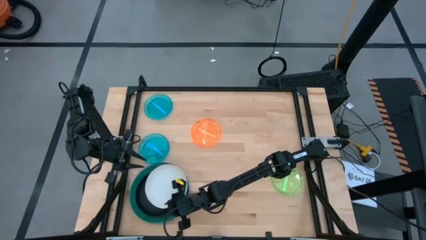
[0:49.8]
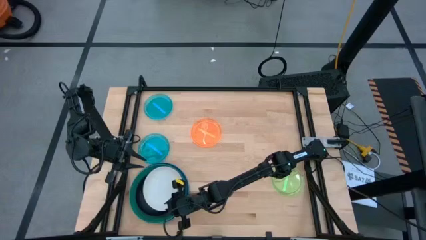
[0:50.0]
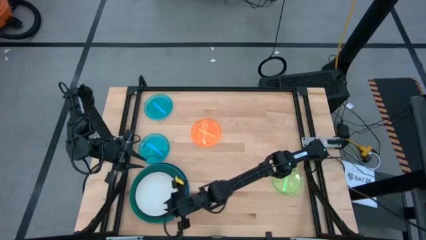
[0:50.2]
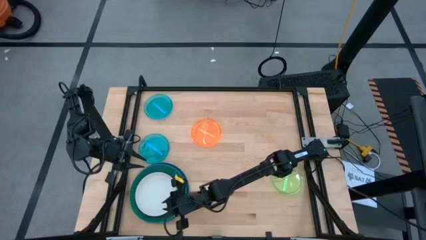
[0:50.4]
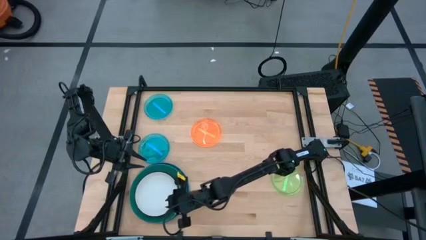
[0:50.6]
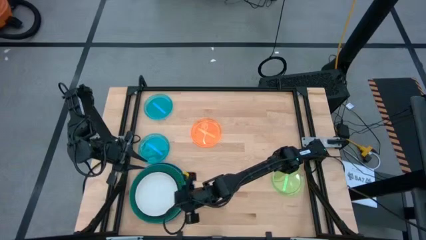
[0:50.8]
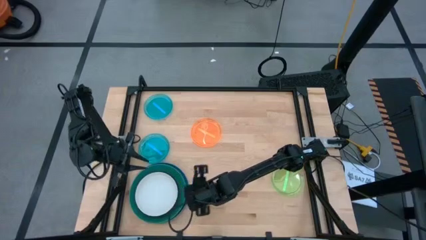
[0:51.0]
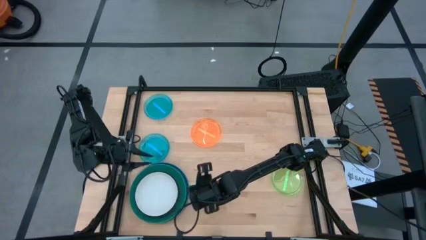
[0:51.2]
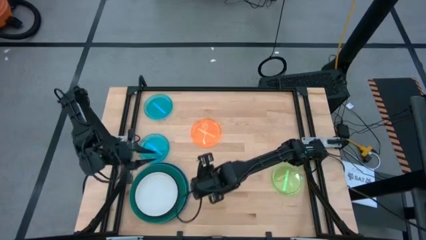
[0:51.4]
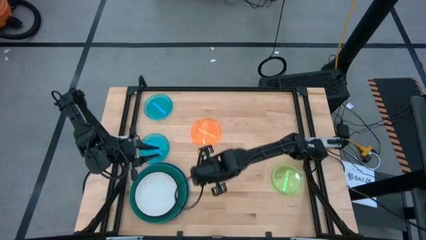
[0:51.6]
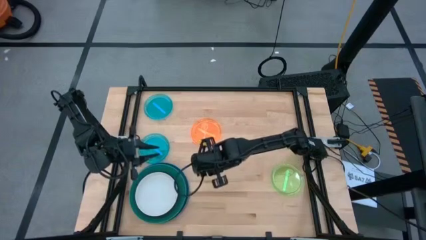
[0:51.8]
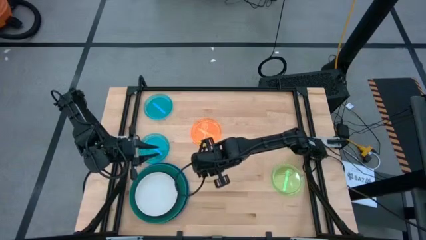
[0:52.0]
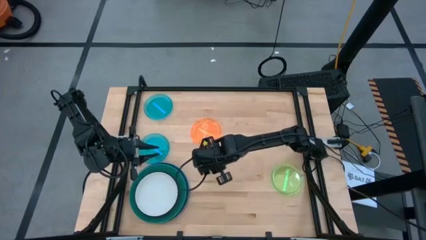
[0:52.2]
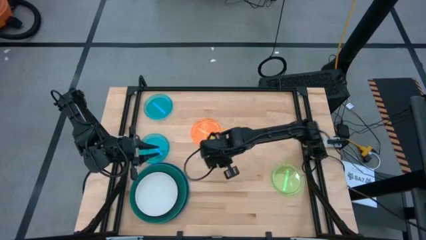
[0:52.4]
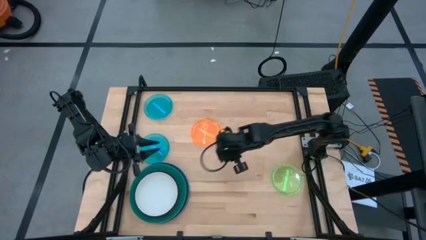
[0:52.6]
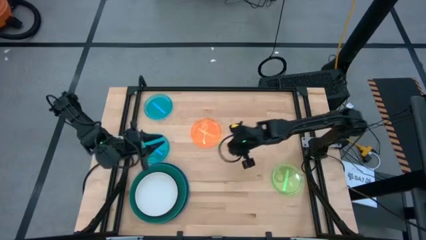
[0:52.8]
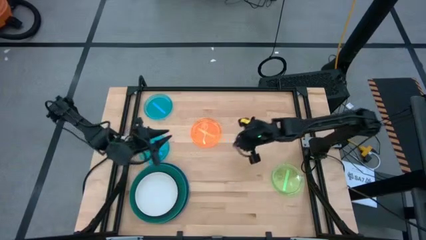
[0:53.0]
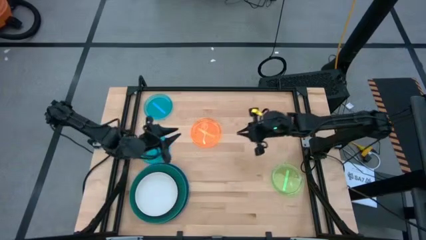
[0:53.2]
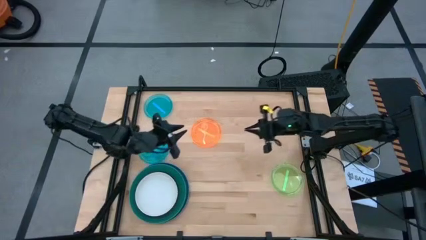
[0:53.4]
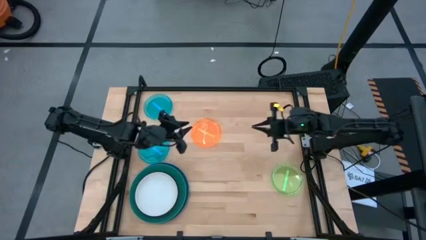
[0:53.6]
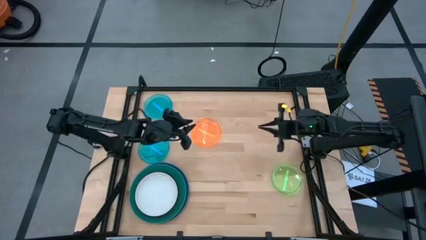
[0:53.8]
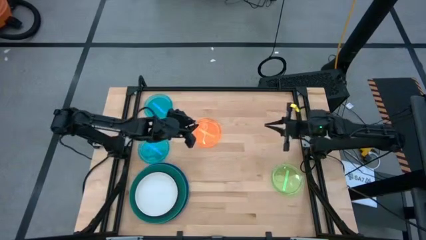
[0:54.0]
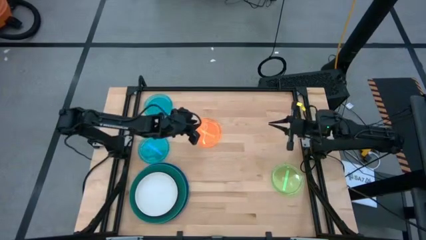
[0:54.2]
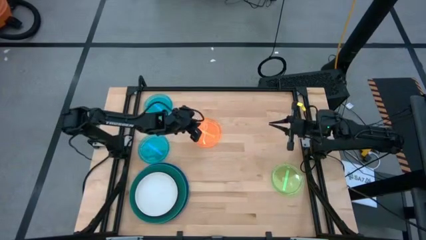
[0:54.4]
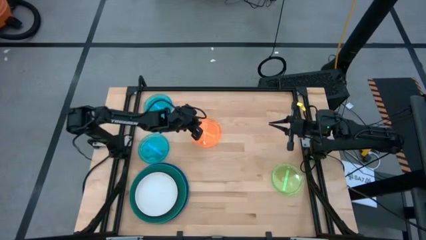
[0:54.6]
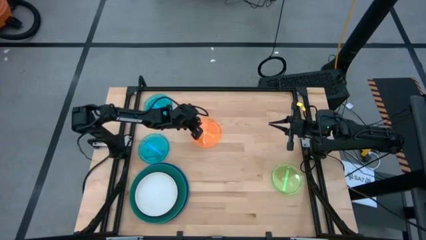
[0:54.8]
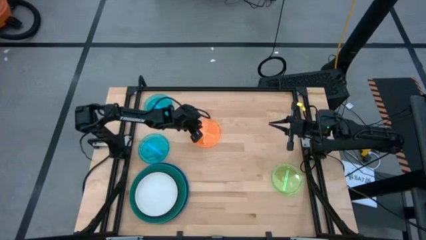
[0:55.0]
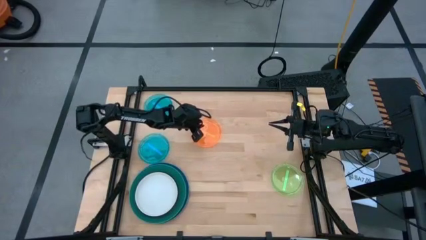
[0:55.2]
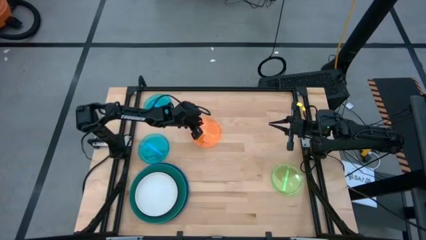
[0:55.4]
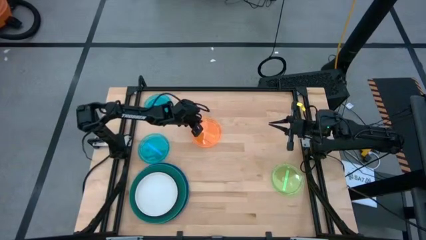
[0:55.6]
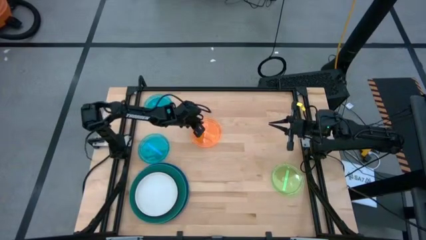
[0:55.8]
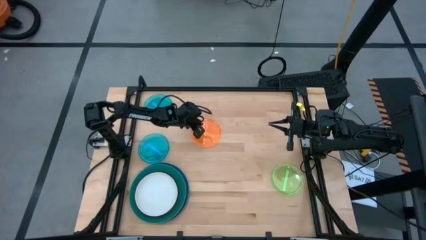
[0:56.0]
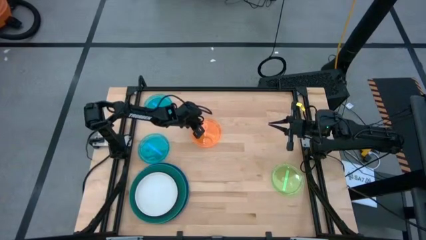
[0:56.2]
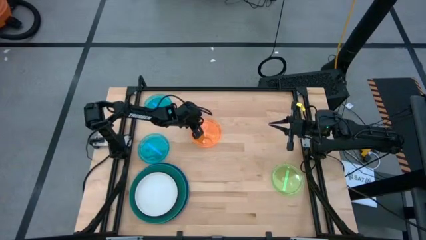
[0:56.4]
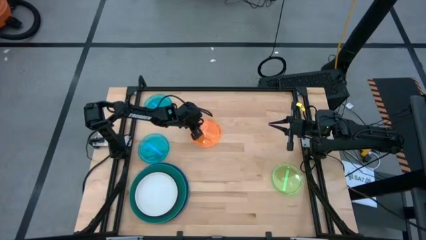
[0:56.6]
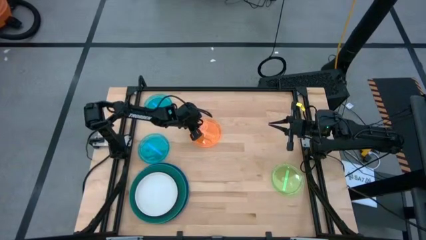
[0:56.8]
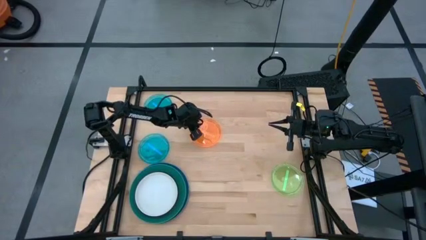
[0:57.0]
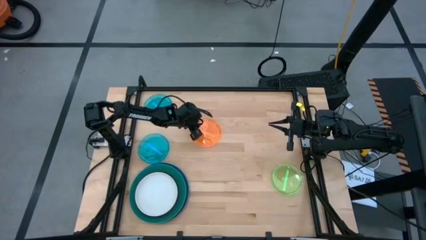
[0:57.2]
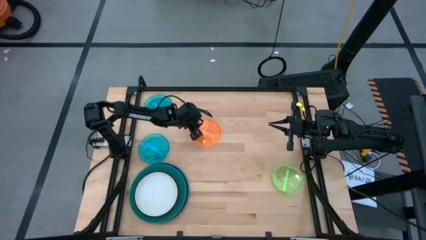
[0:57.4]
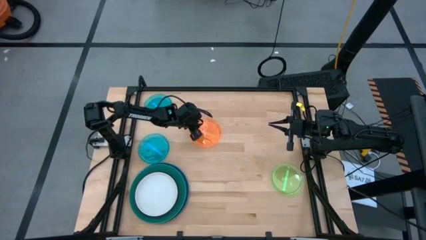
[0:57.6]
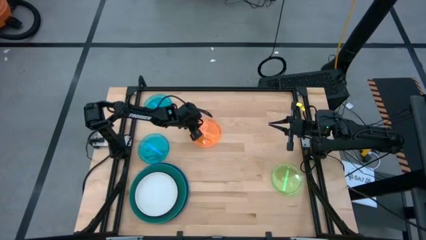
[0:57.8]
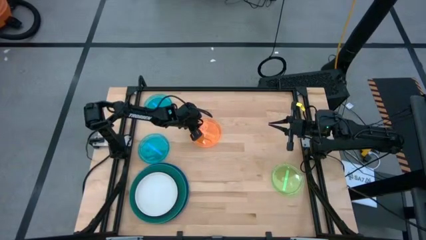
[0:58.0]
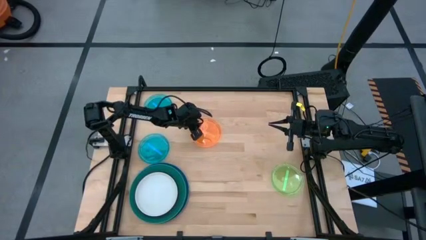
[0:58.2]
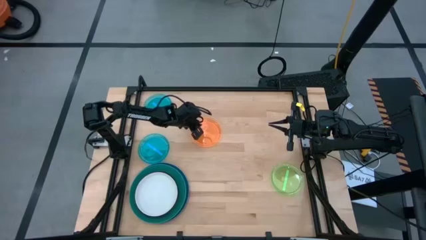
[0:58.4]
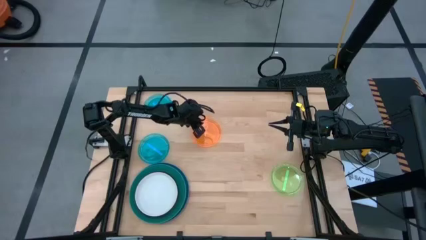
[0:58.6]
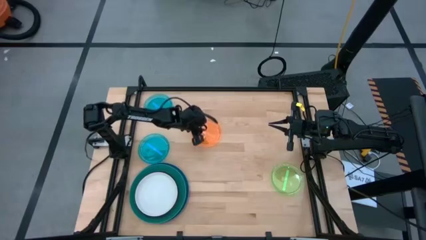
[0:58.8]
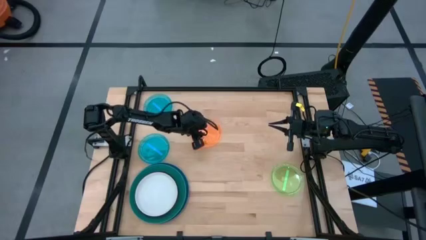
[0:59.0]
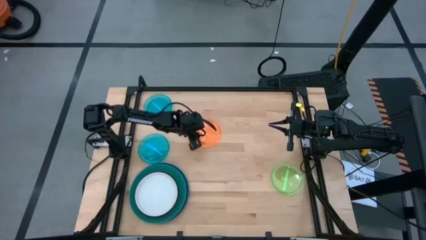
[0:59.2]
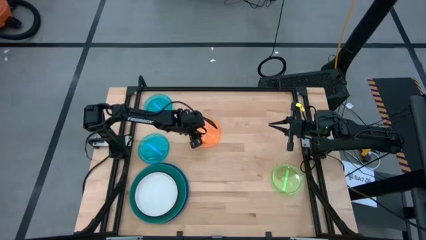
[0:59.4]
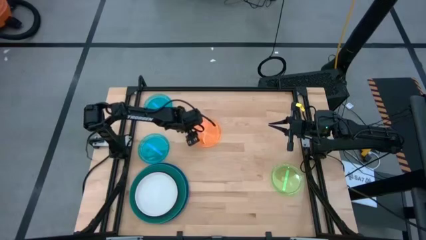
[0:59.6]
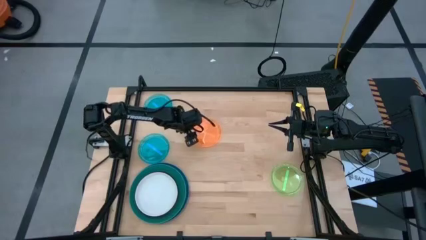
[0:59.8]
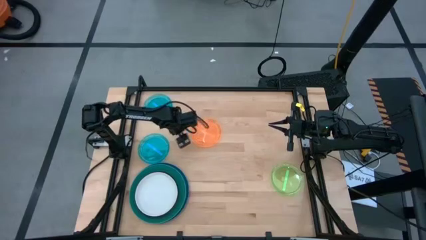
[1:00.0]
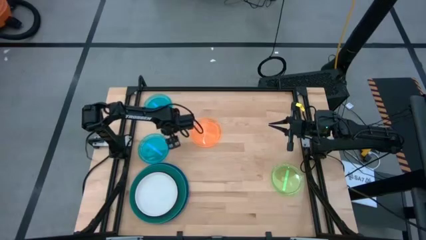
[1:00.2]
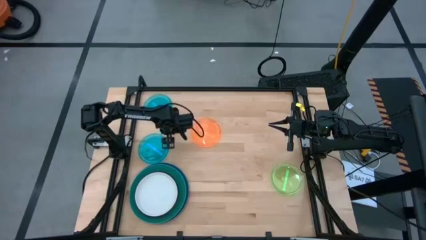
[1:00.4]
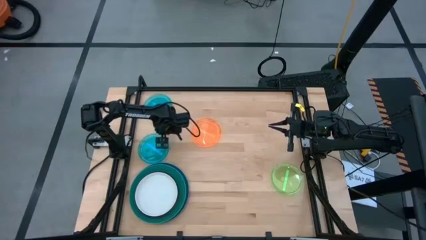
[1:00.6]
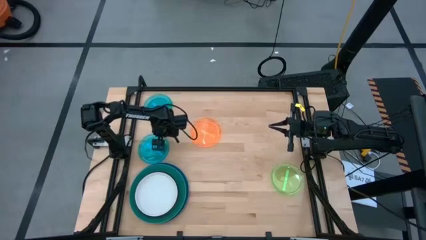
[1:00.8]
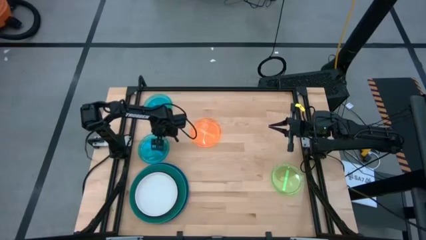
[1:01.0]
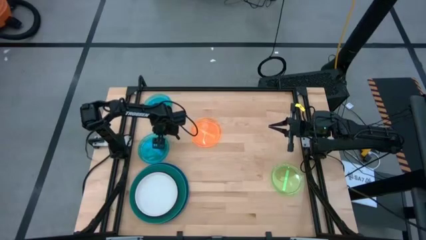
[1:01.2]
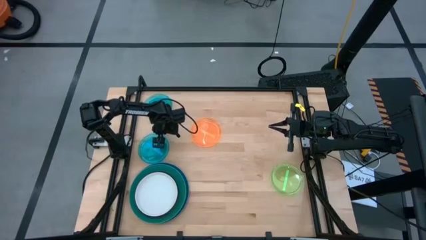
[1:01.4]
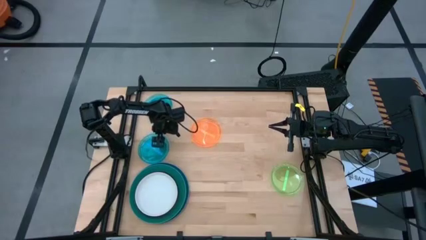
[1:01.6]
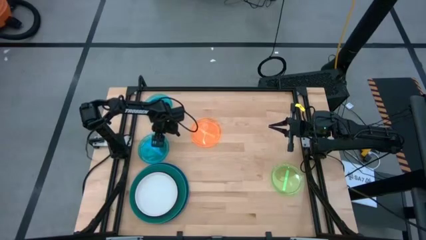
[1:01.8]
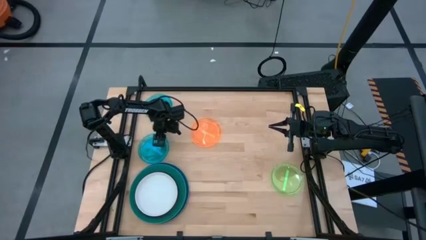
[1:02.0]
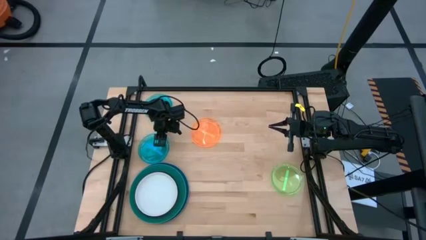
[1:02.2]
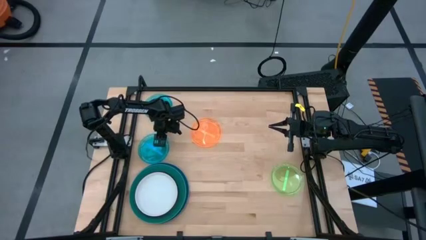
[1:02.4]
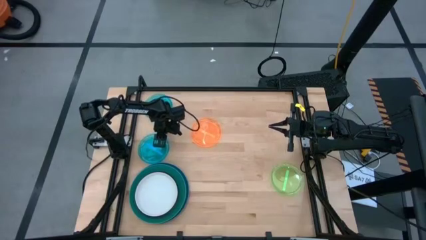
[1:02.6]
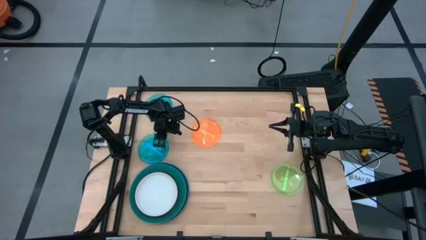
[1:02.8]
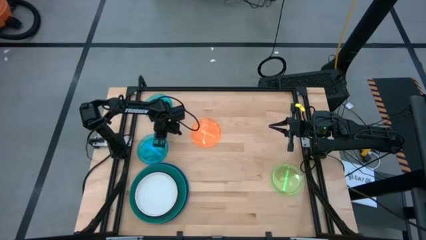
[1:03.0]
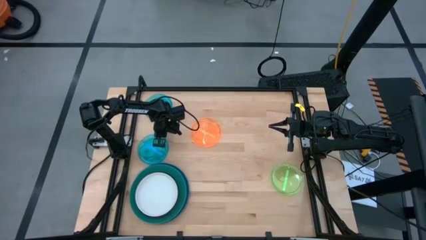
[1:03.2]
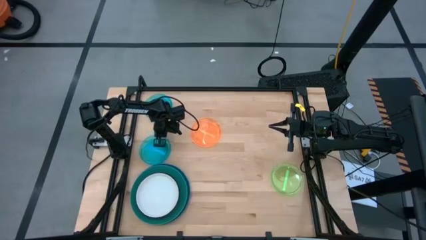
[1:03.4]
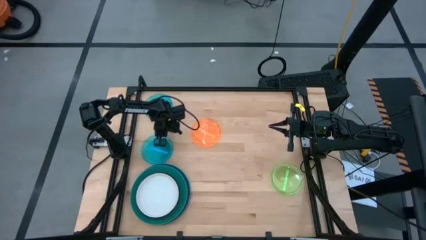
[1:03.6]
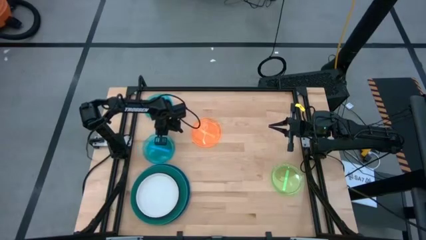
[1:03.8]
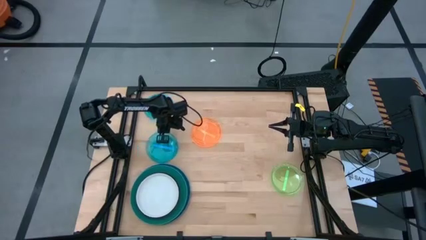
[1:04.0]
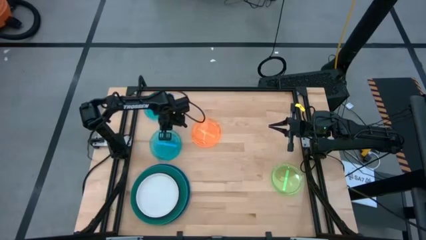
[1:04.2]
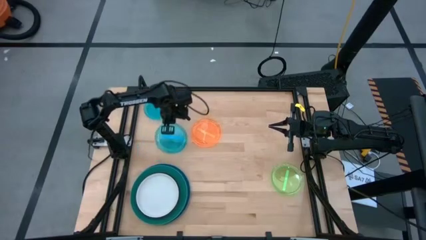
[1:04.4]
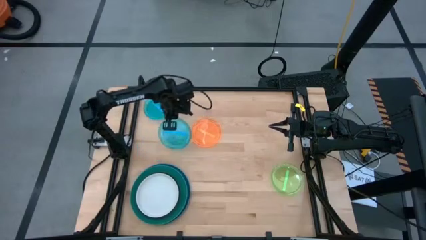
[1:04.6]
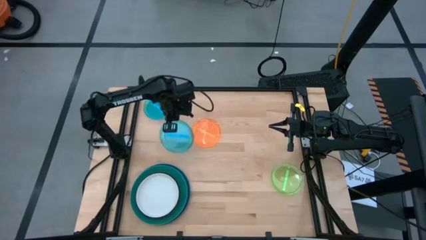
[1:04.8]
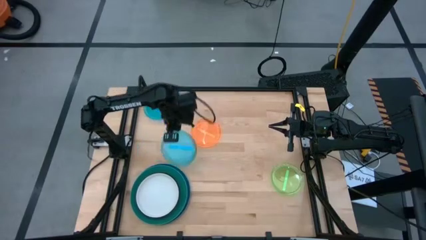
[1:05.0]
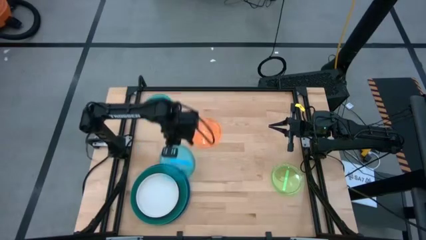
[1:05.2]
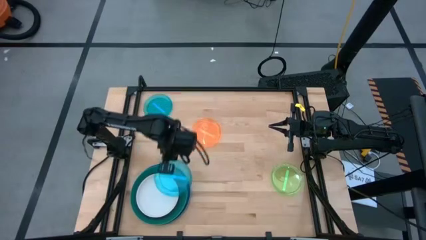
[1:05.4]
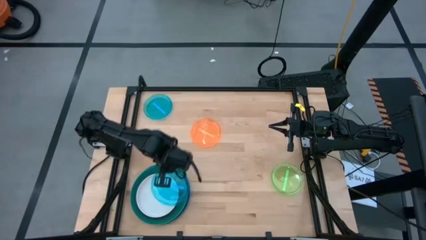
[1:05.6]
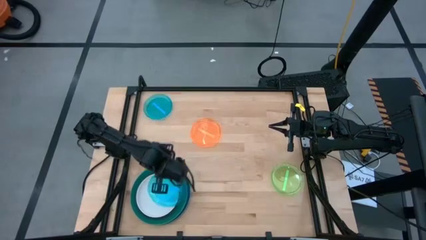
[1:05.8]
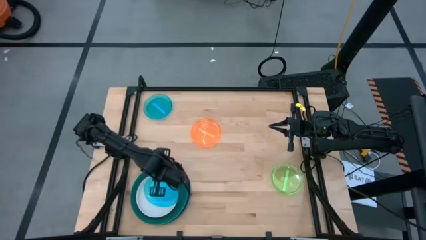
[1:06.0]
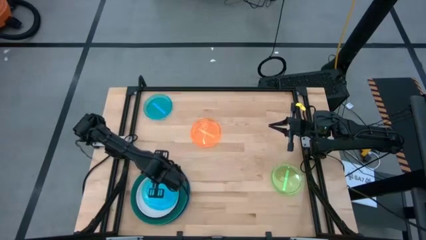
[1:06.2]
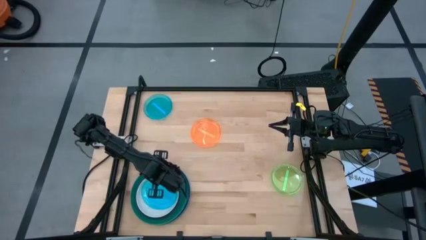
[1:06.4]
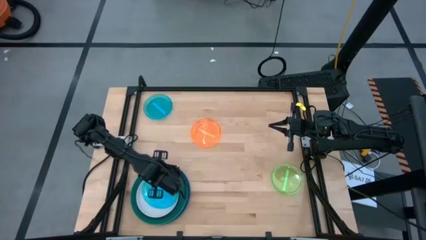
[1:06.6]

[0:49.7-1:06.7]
Task: Stack plastic plates
Stack the bottom light blue plate on top of the white plate
